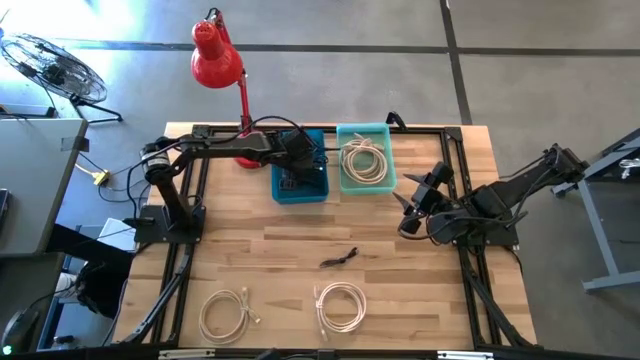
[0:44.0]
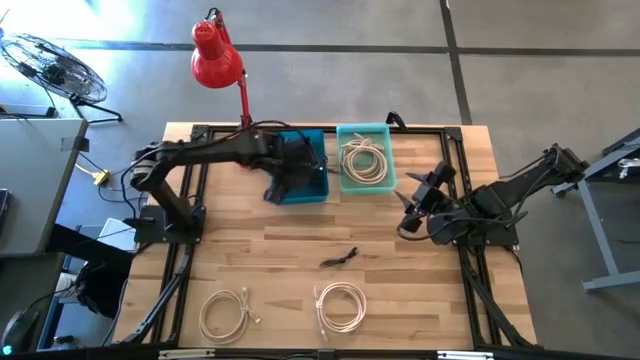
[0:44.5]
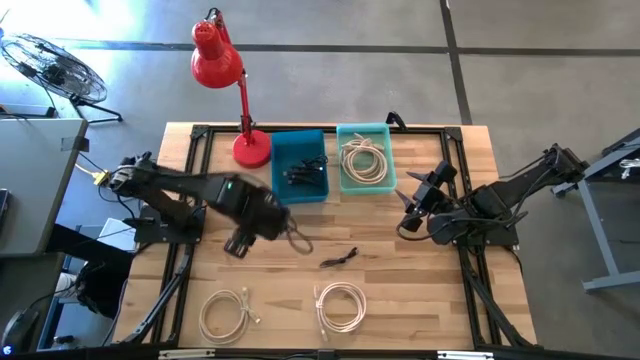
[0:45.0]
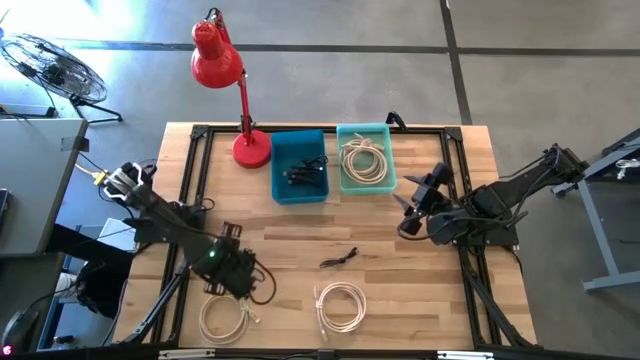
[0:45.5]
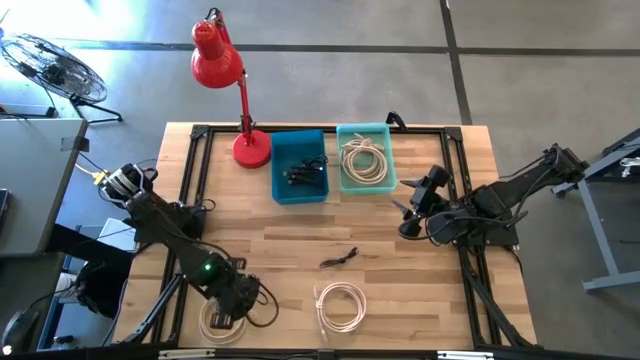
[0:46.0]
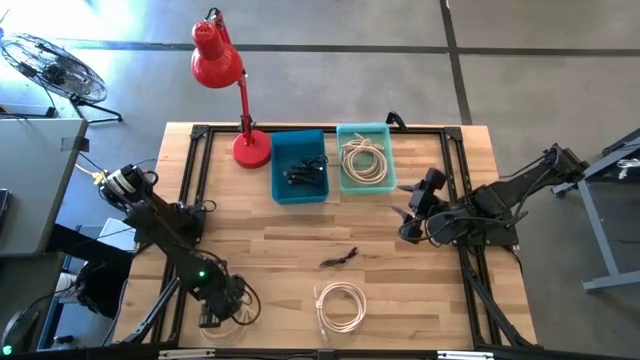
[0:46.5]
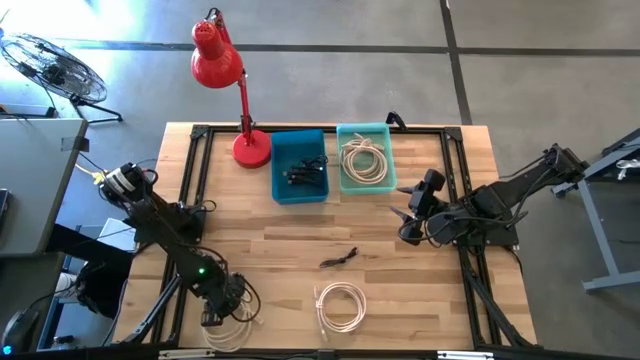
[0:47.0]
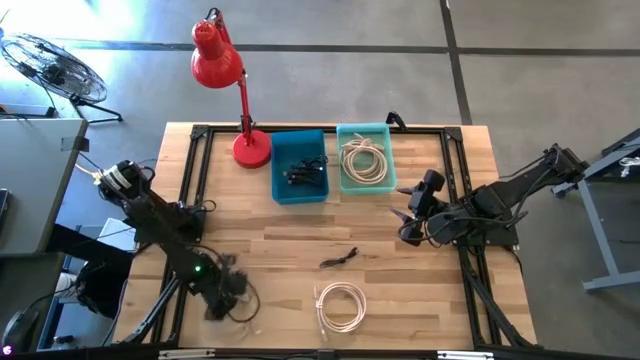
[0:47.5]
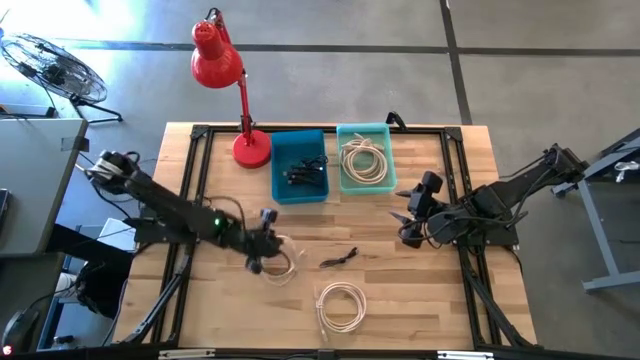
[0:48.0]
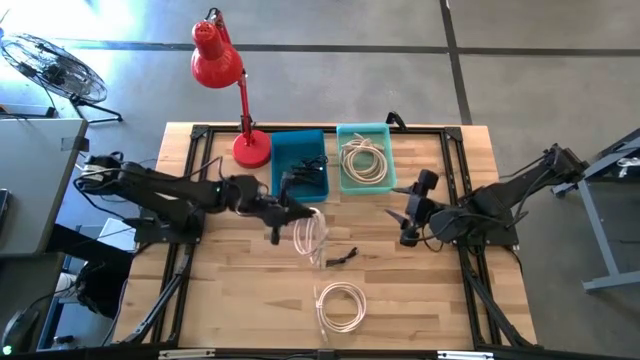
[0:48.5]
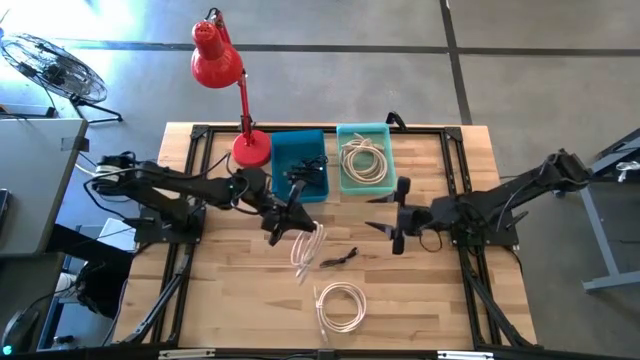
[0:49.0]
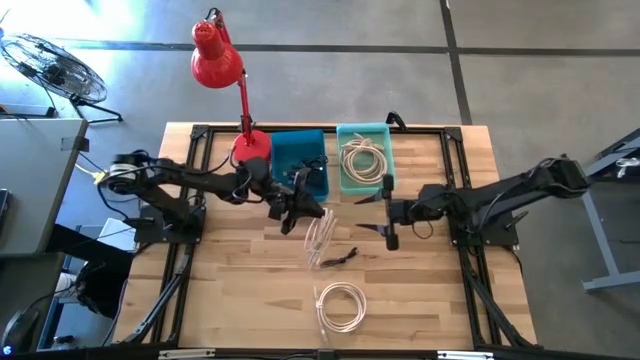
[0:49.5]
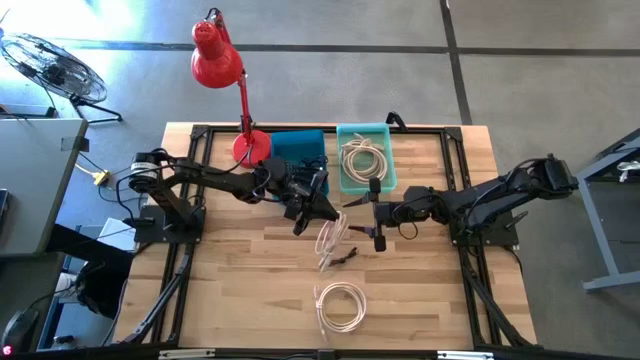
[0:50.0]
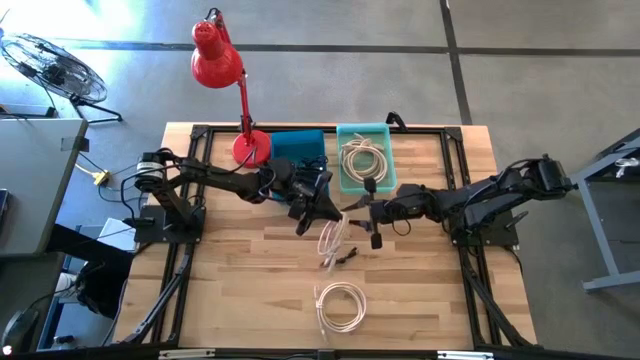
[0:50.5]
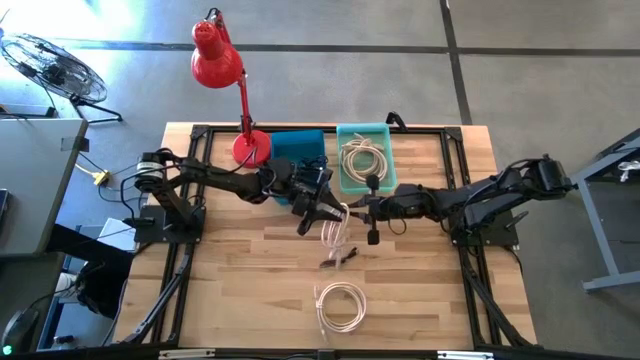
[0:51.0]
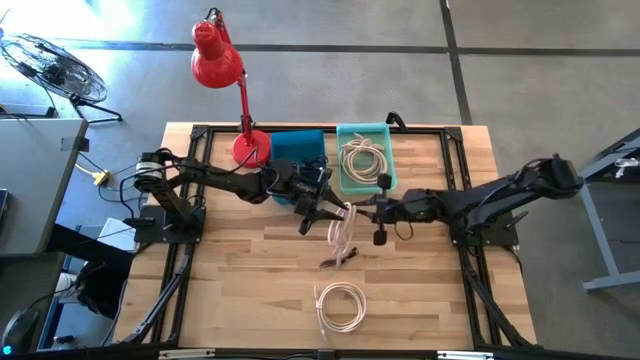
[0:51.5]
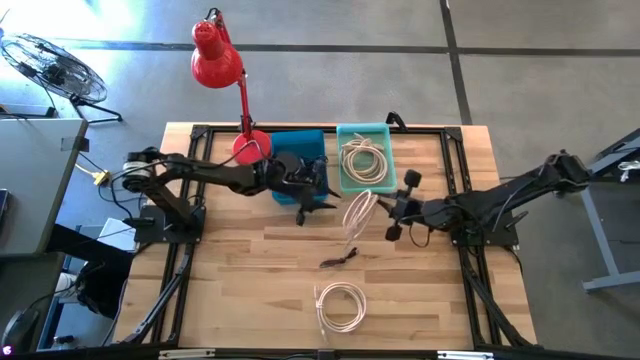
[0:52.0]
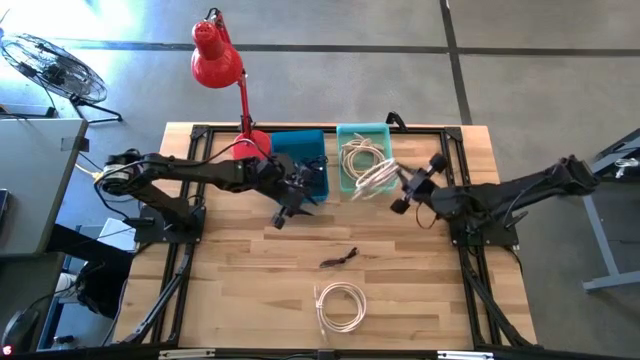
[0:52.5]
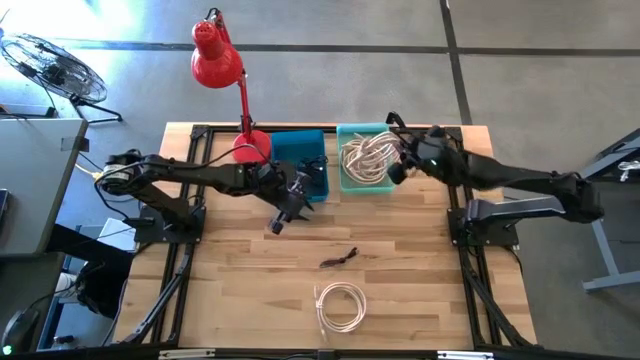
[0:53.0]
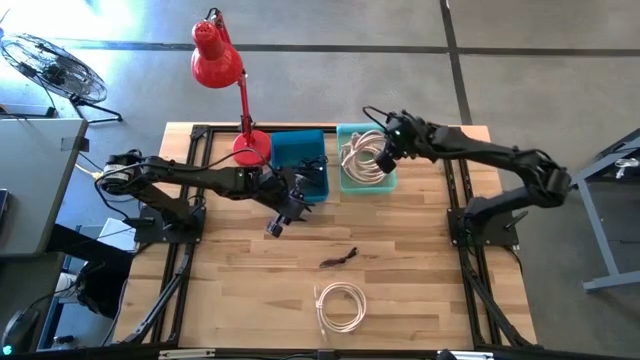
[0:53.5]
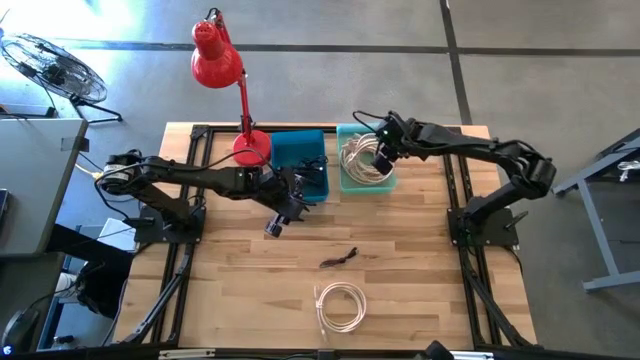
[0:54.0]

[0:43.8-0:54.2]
Task: Pick & Place USB Port
Put the white hdmi cable into the green bin

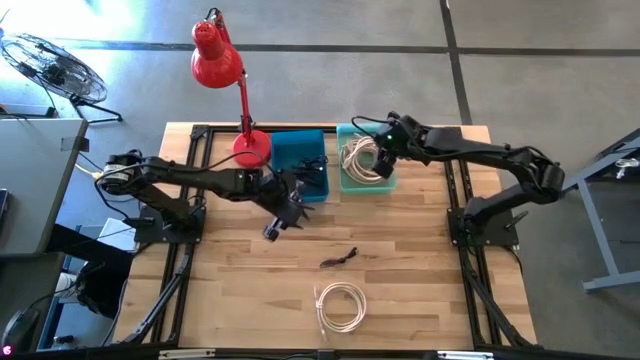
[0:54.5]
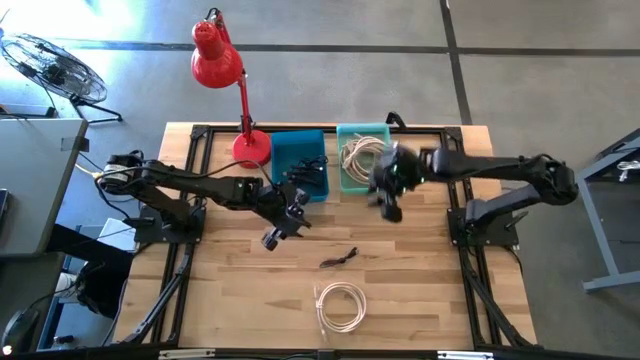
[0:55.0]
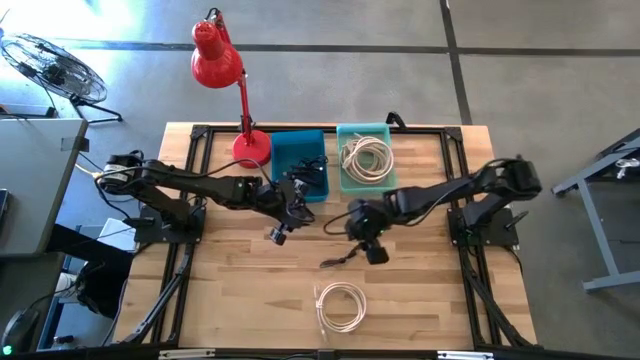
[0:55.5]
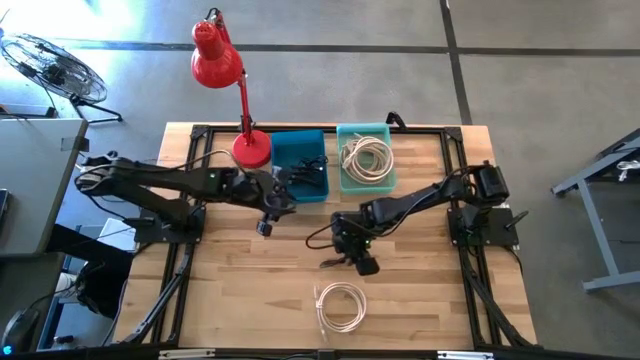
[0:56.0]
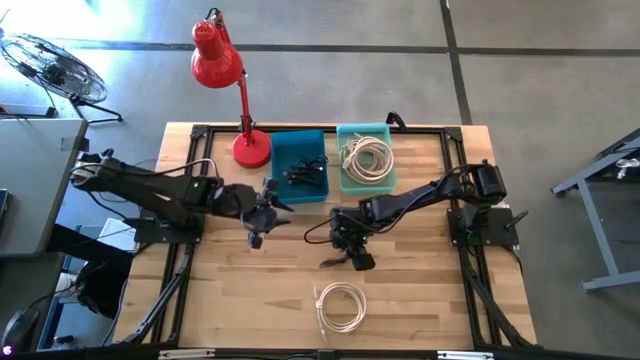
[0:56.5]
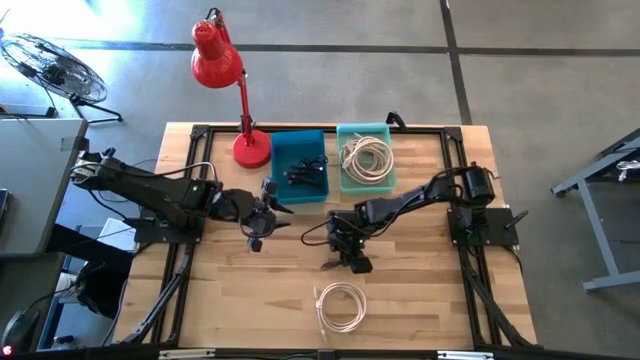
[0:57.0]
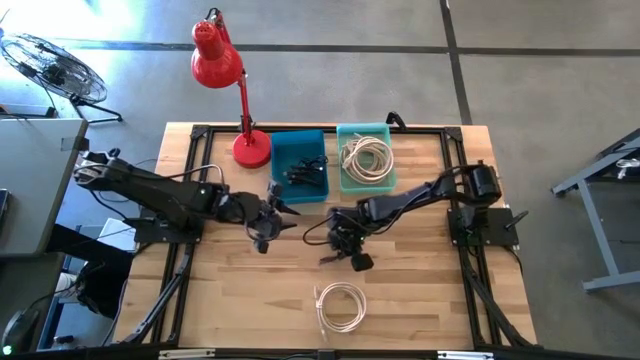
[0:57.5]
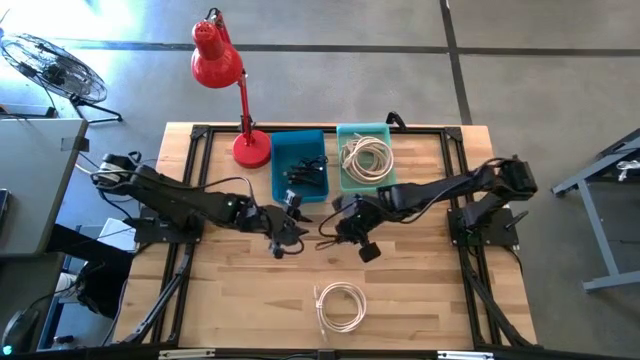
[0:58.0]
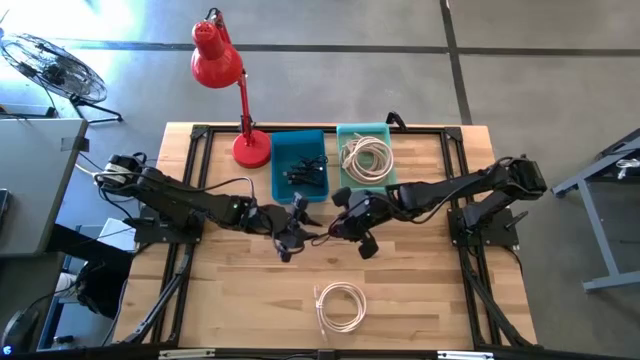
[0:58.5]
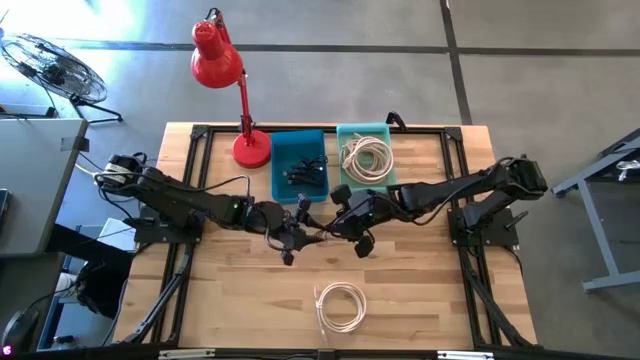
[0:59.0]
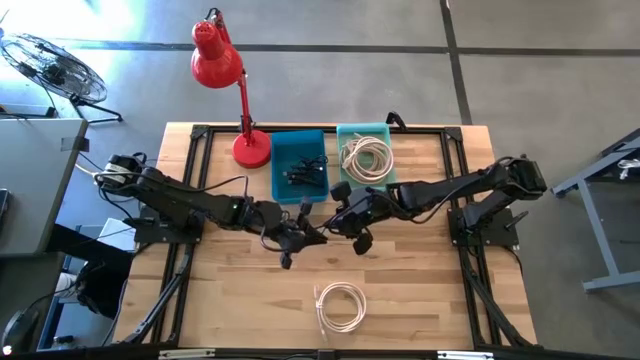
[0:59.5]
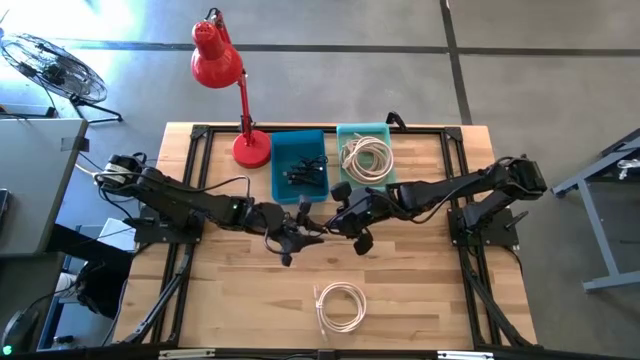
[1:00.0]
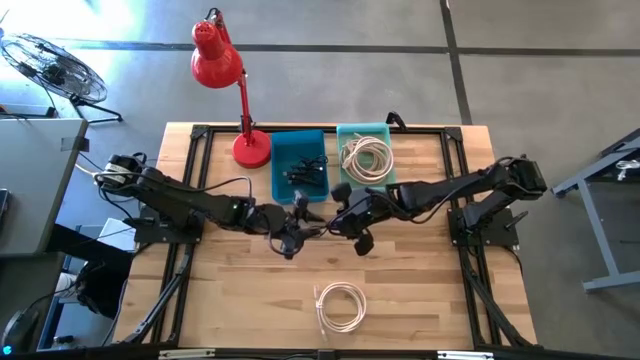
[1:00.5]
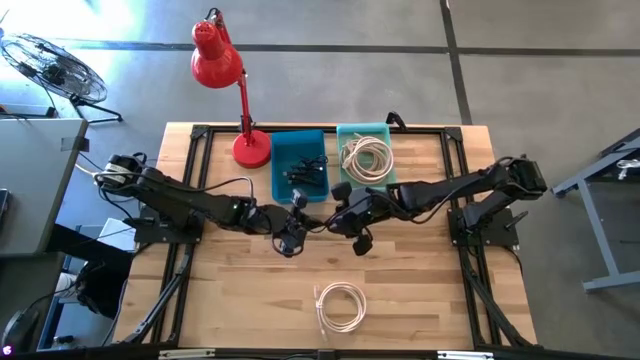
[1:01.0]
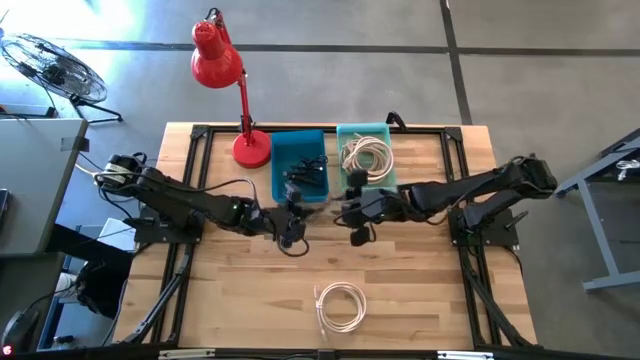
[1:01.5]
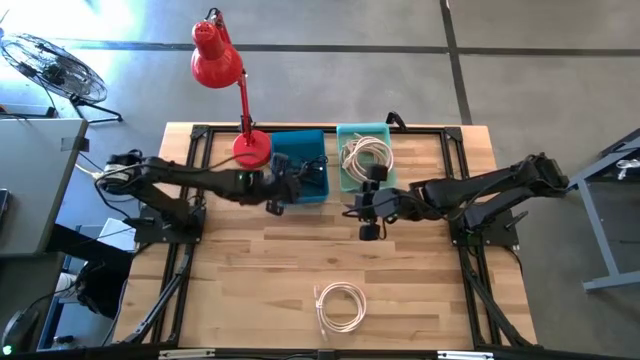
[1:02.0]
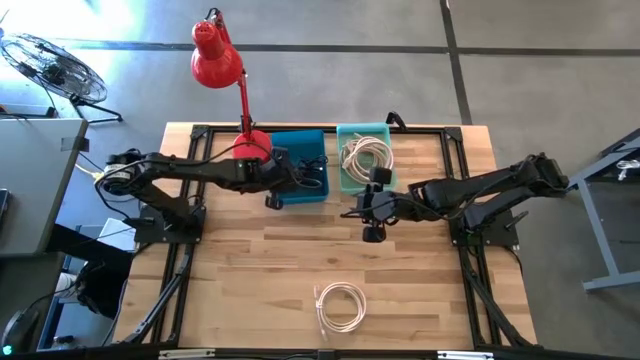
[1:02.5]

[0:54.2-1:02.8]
Put the black usb cable into the blue bin

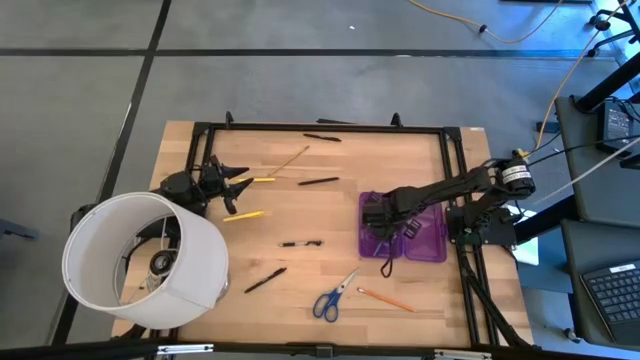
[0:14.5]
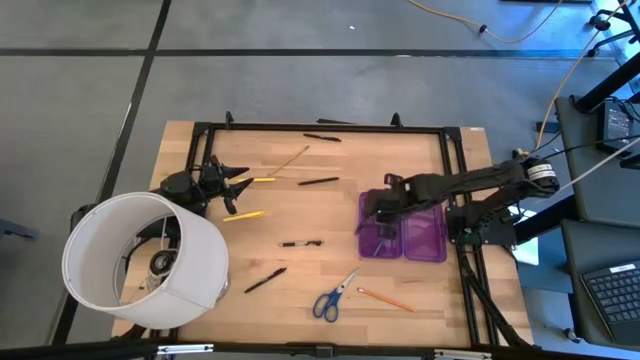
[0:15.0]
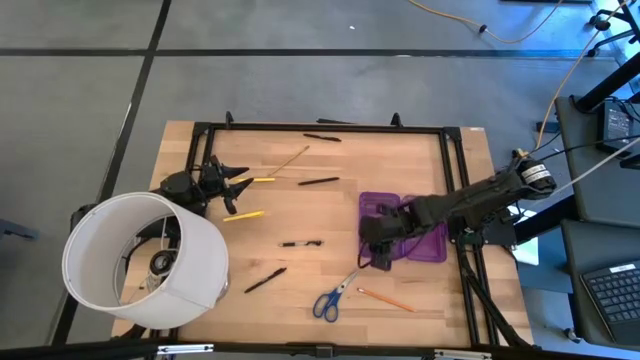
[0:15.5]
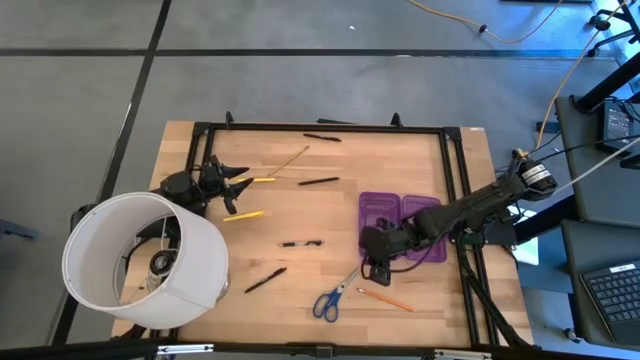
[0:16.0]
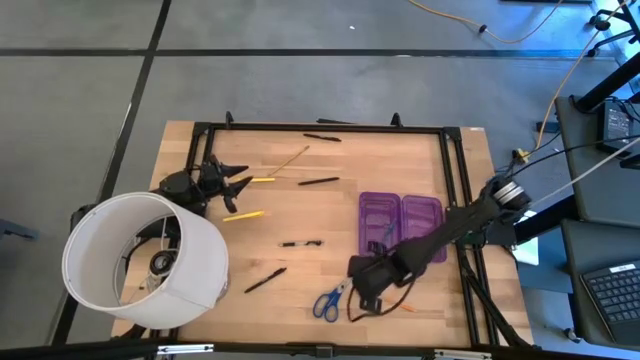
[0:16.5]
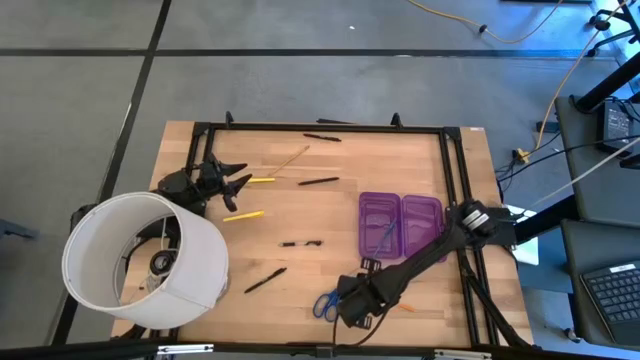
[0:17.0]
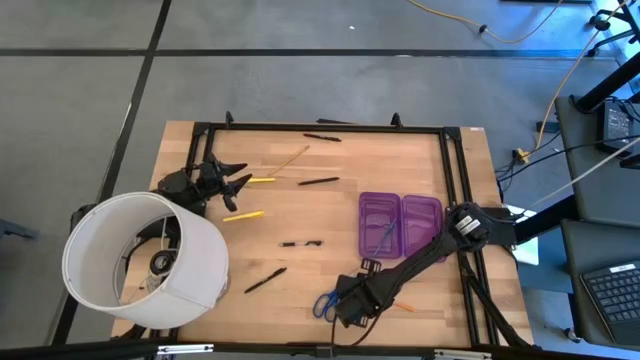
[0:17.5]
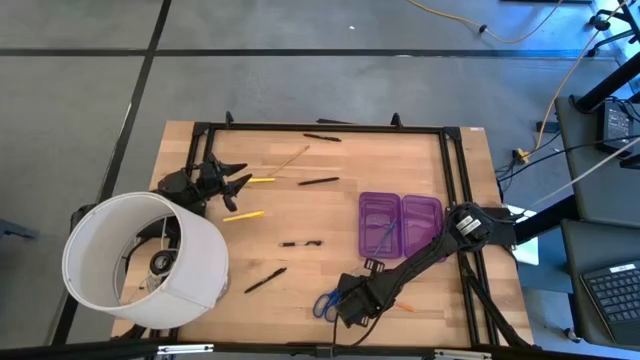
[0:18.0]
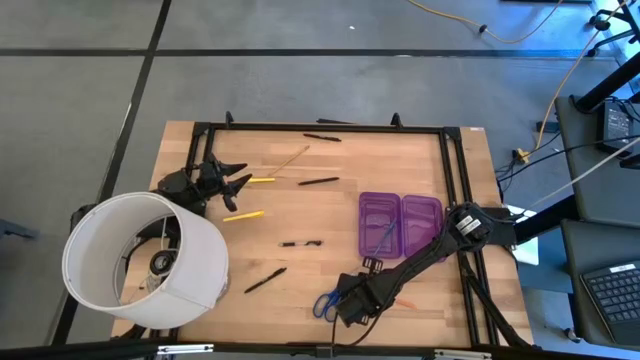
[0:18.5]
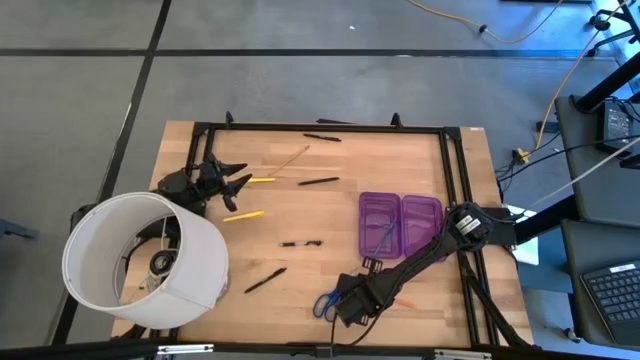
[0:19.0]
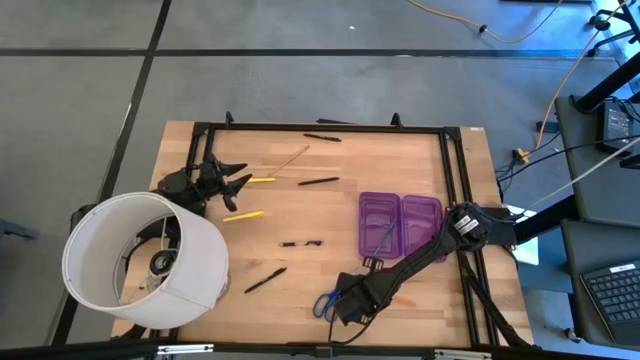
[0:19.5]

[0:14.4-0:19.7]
Task: Pick & place school supplies into a supply box
Put the bottom pencil into the supply box
